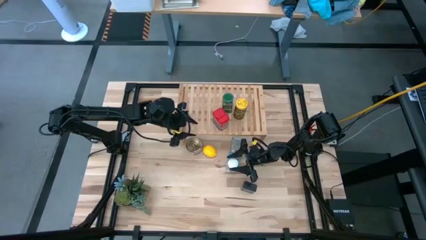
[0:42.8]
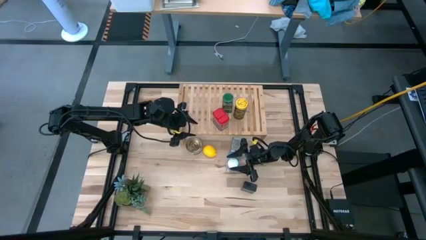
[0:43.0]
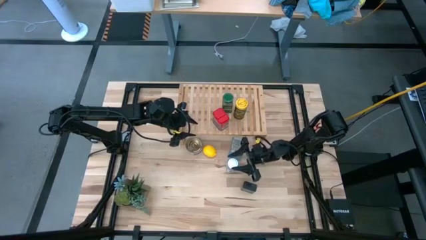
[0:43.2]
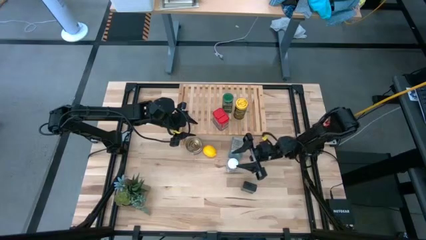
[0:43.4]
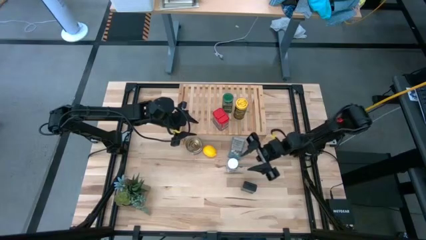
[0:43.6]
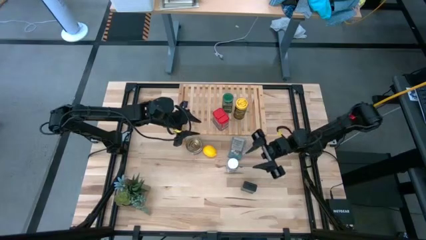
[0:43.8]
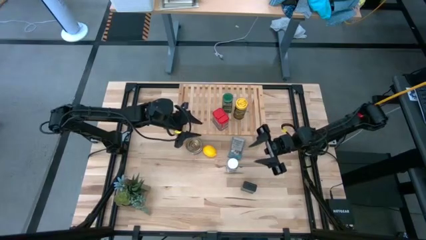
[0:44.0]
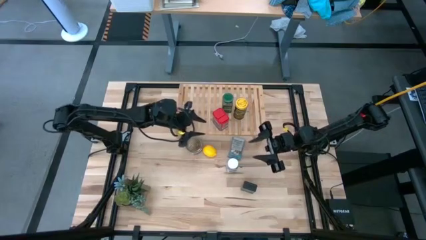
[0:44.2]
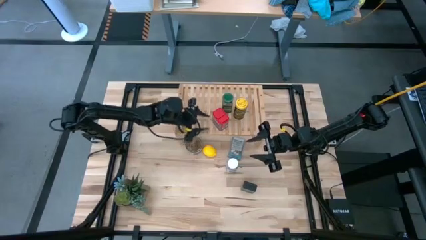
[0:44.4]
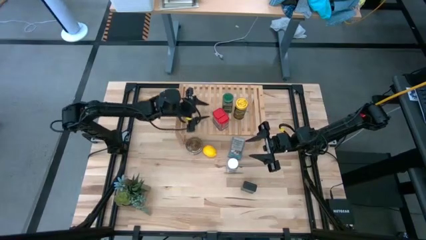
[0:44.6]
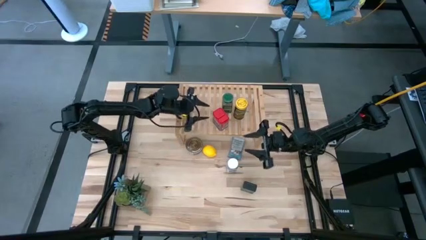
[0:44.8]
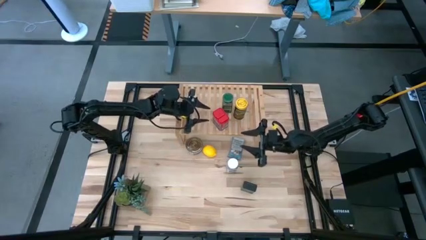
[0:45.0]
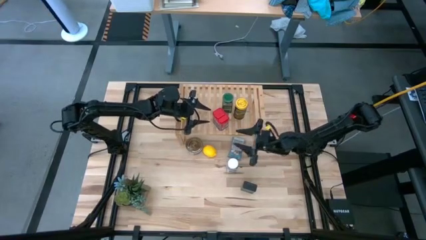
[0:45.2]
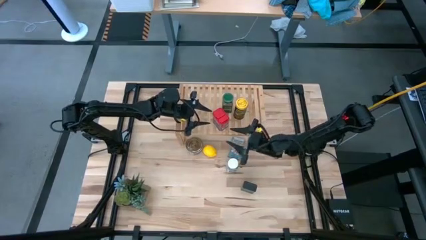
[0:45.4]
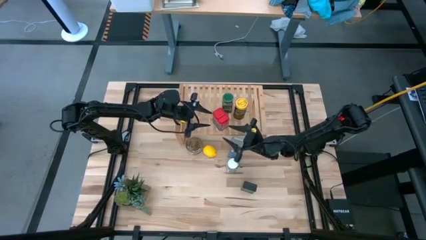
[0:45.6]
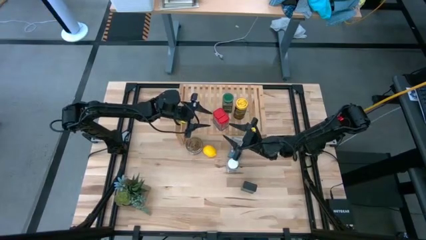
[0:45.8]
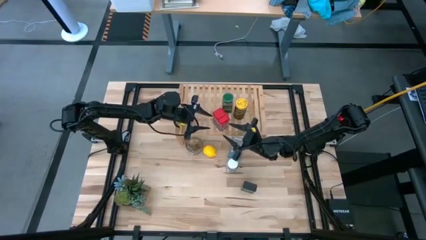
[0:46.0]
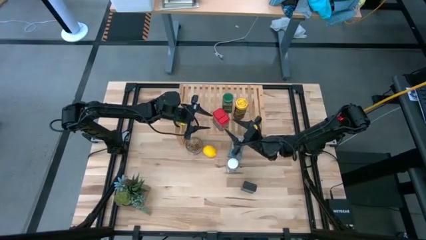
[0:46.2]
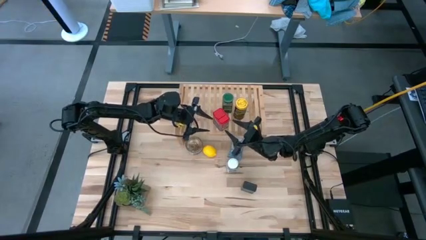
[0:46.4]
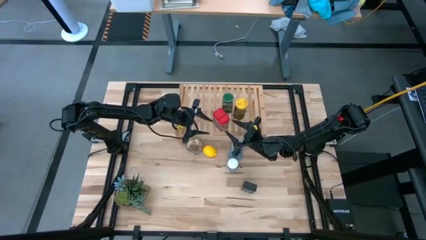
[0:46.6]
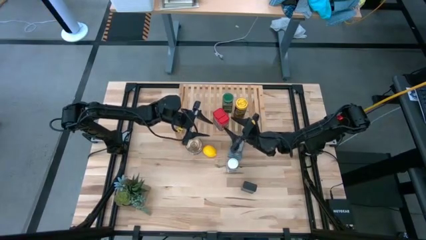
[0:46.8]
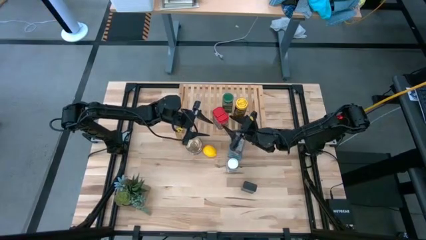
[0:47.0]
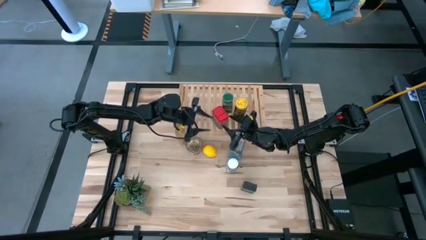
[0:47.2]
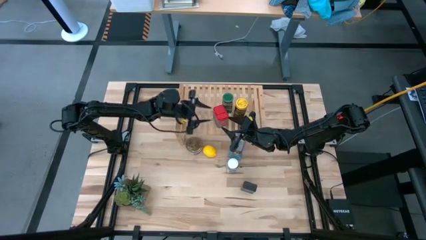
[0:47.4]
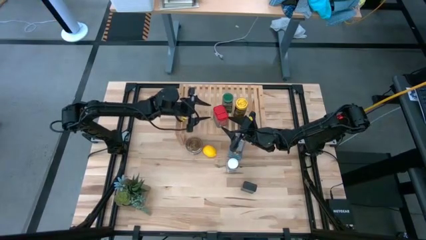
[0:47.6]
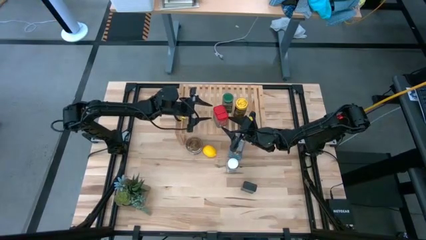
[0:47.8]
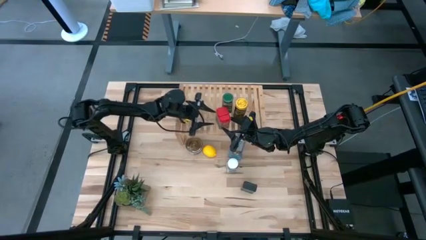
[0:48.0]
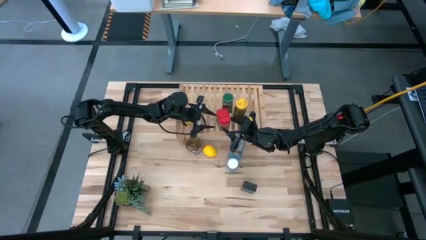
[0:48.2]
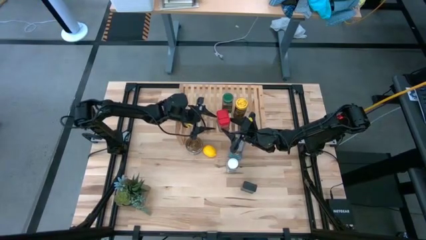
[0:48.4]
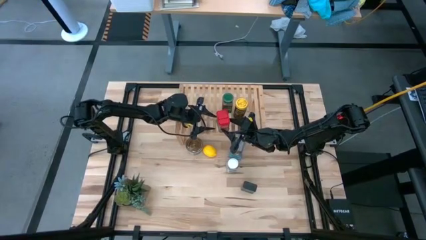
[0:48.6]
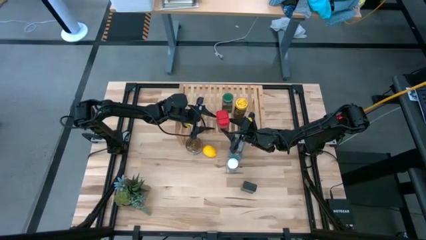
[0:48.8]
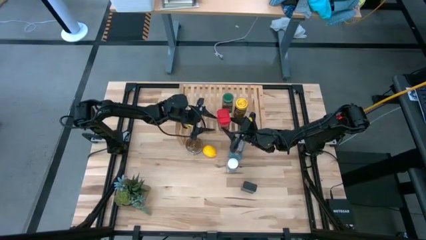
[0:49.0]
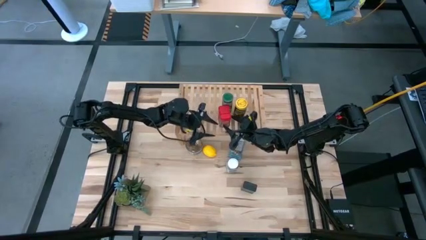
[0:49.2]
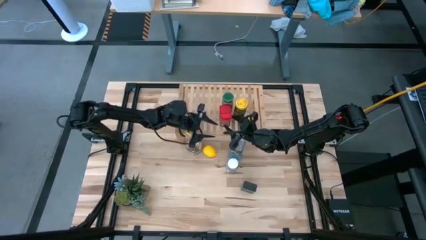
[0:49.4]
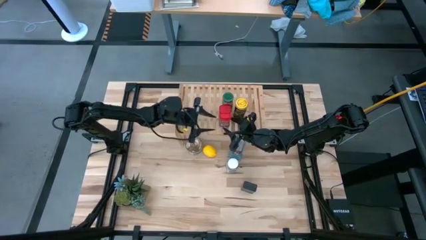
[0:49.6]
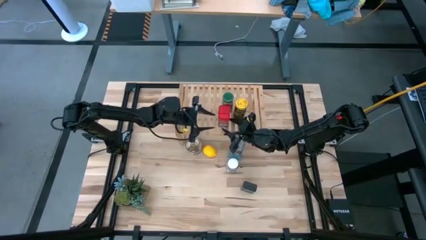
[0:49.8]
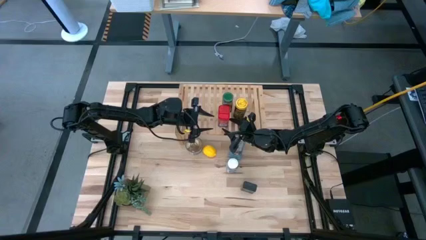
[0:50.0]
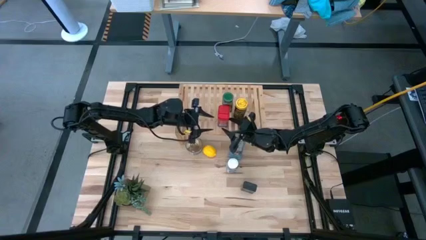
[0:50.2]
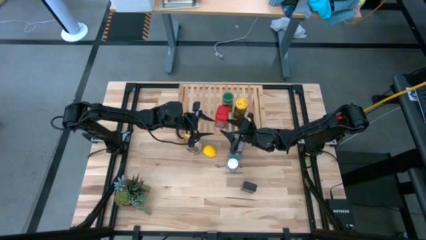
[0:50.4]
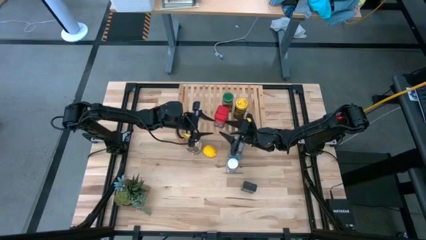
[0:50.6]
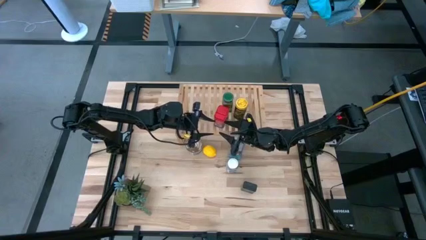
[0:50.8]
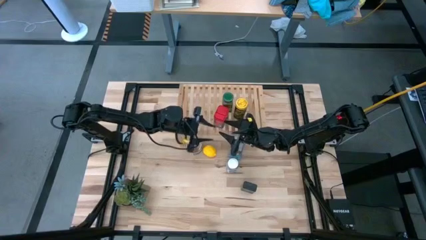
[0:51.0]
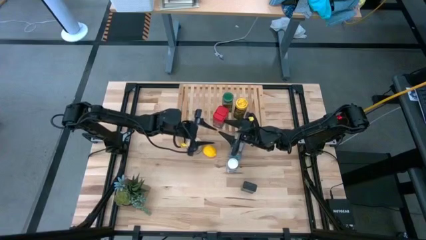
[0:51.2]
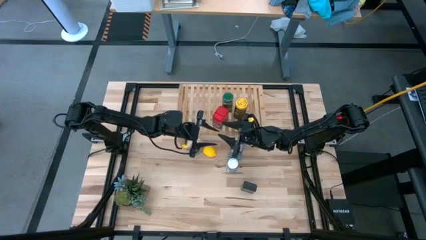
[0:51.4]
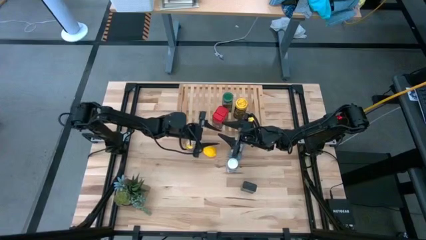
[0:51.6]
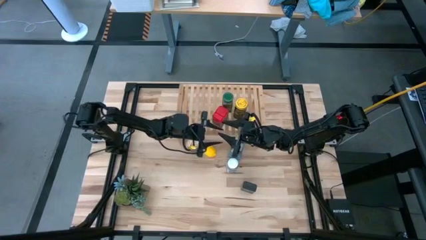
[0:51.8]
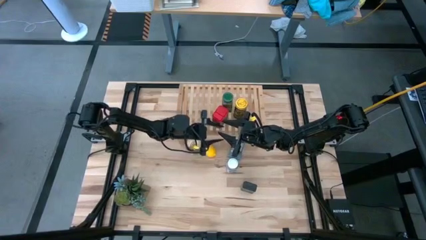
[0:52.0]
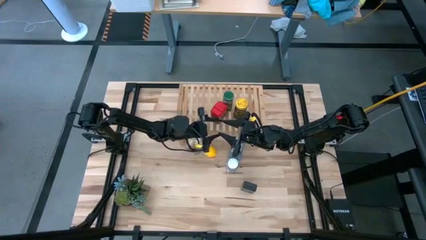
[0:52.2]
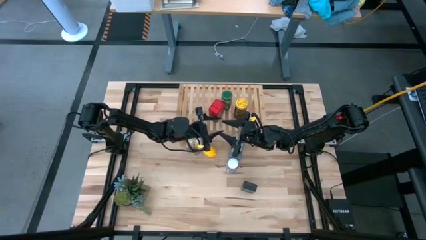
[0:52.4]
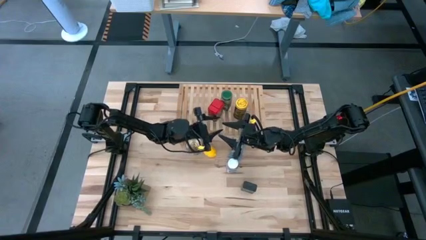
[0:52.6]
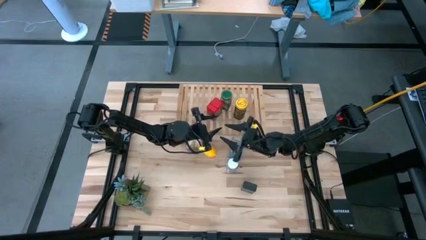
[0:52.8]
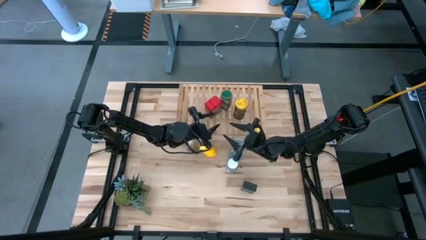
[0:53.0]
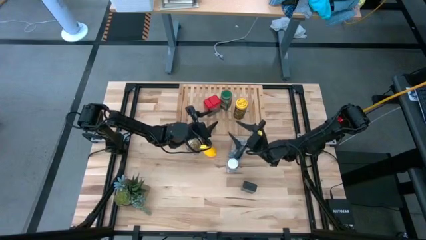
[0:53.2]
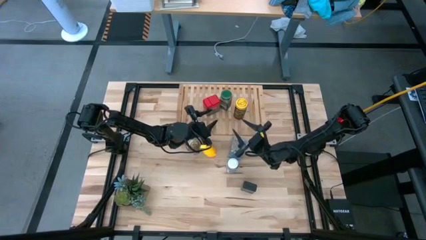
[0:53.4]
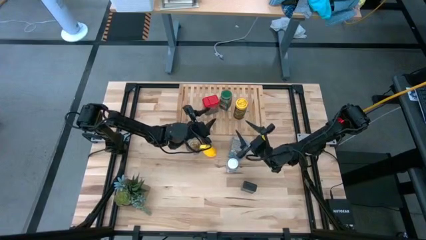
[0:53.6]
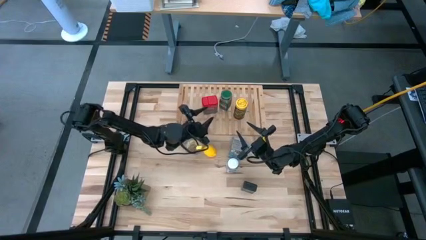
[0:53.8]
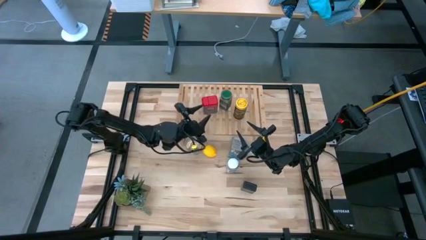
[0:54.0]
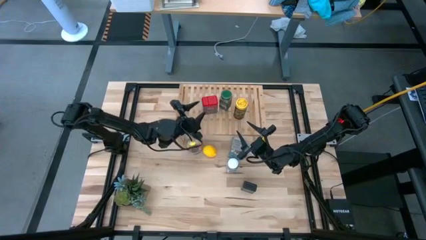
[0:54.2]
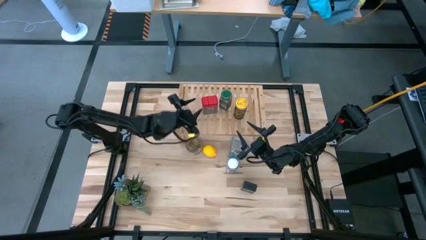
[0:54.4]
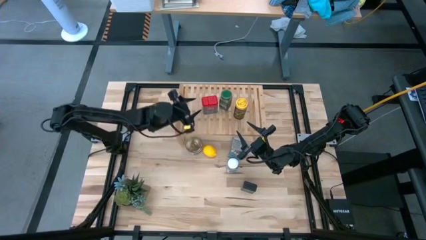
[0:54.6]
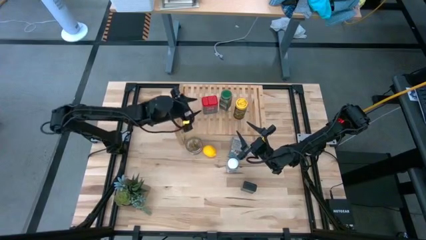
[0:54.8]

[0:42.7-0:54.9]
Task: Shelf spices
Remove the red seasoning can from the shelf

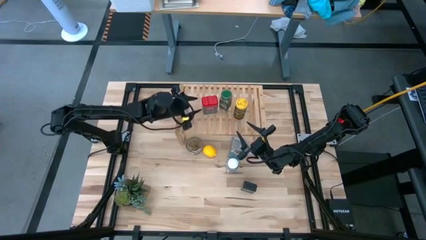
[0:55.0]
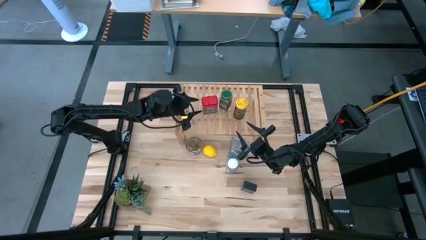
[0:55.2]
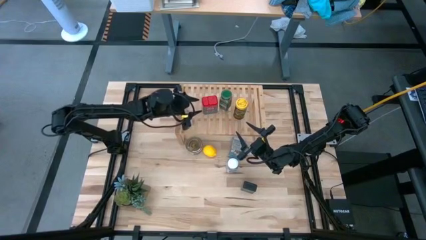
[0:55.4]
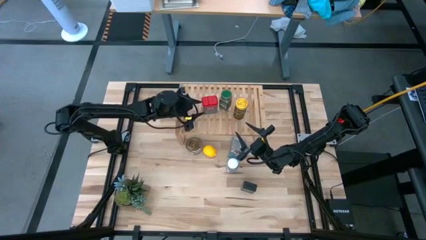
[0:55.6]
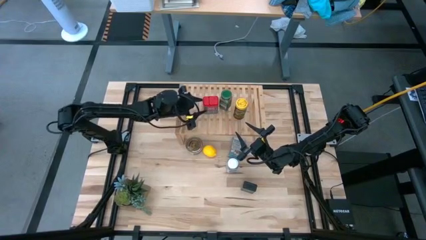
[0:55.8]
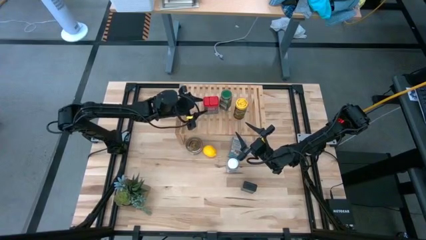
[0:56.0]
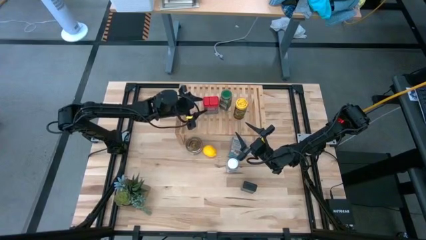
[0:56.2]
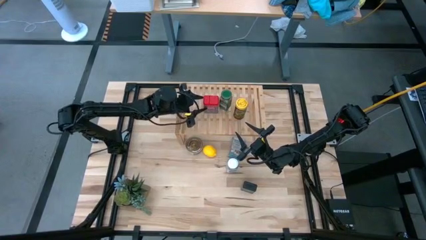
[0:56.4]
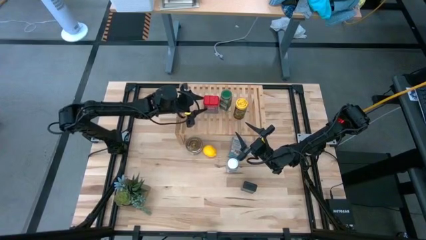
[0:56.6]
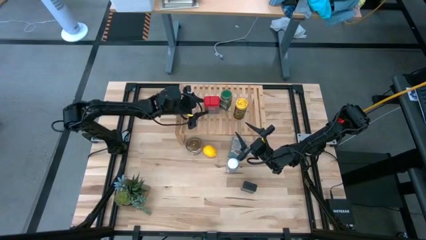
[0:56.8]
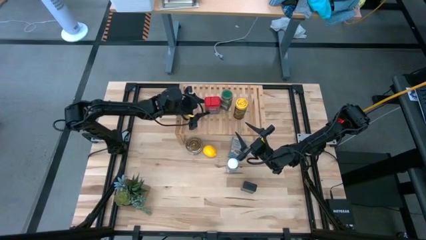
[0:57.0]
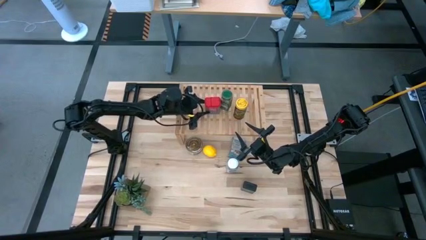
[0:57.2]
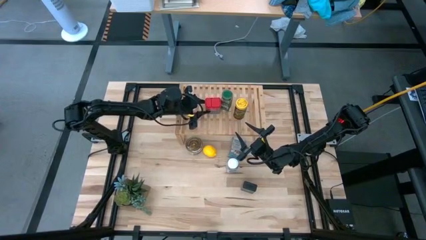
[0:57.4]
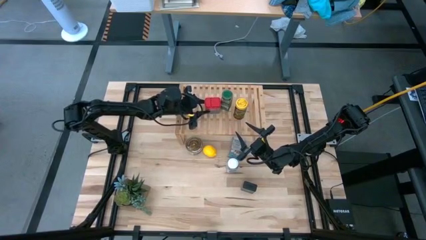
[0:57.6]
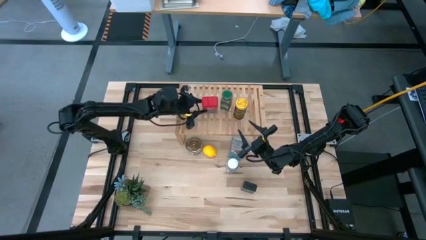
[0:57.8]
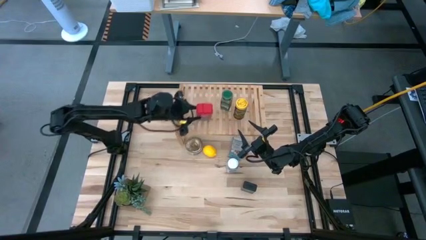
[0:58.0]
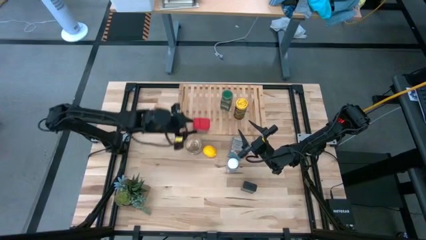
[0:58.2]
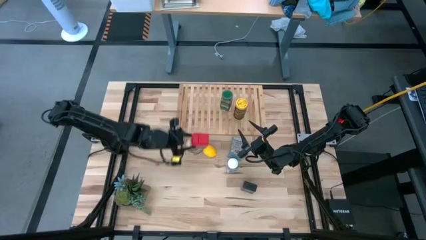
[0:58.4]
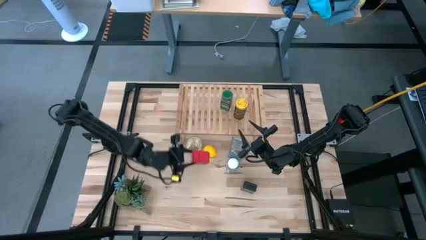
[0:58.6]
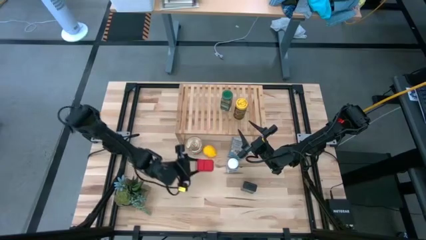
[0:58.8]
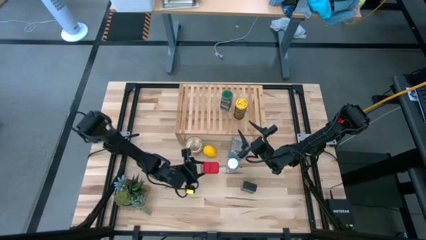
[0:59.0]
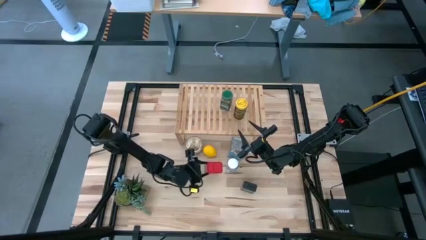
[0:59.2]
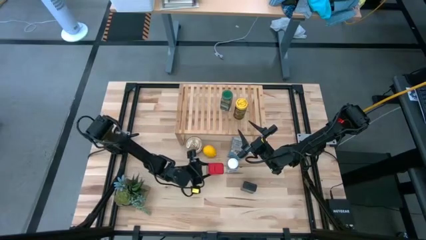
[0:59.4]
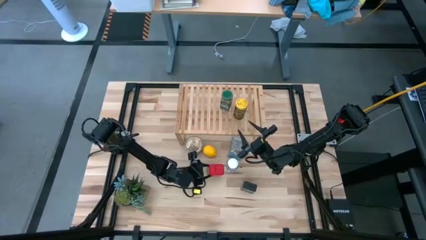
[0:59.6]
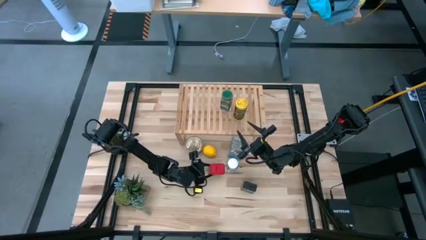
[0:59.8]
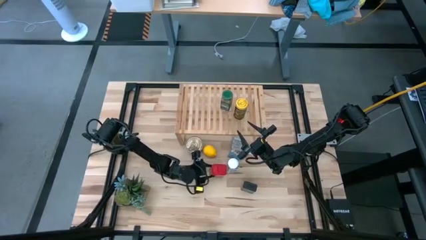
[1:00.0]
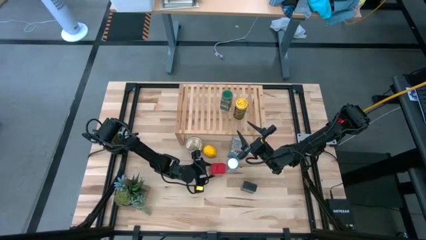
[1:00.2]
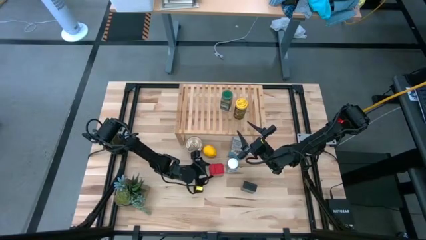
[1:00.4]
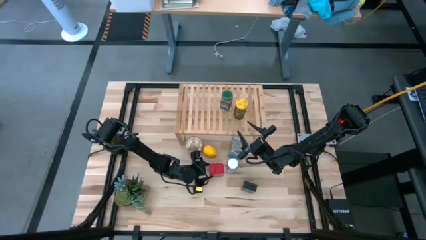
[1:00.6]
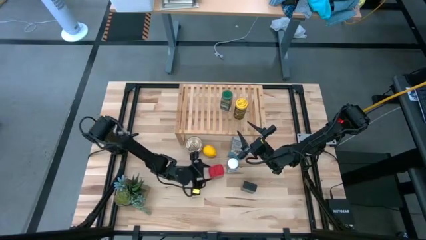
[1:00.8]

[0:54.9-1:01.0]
Remove the red seasoning can from the shelf
